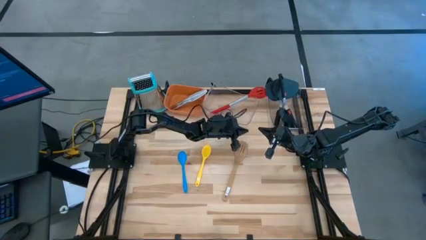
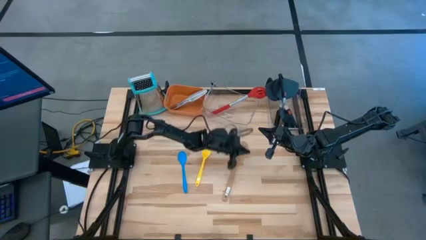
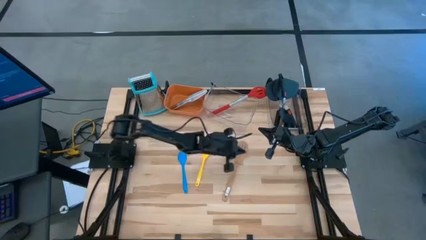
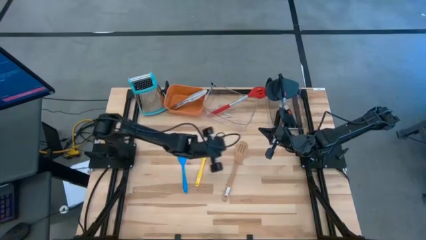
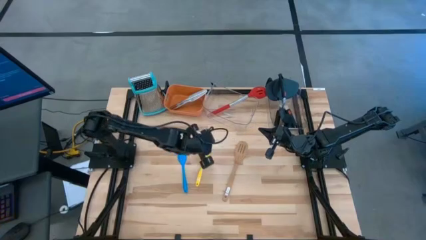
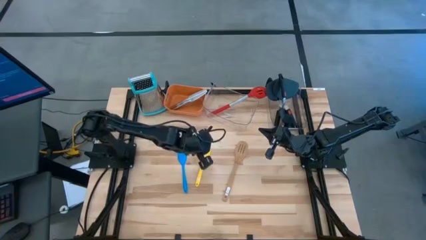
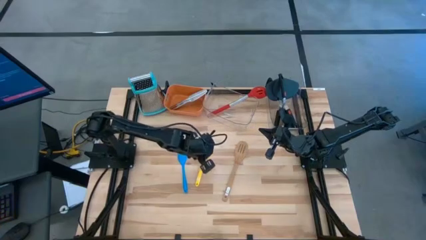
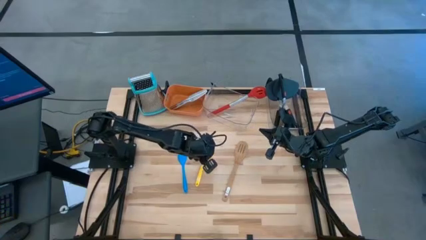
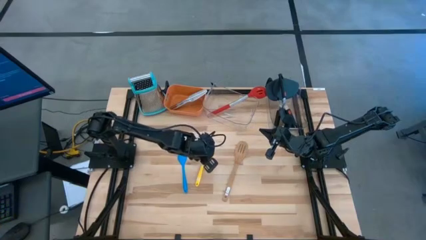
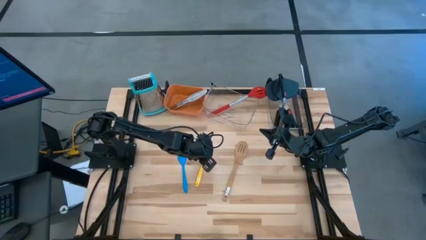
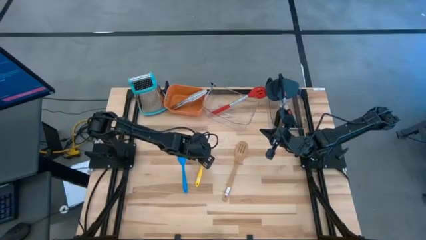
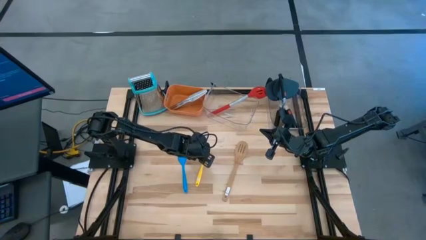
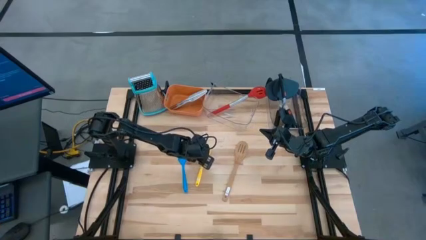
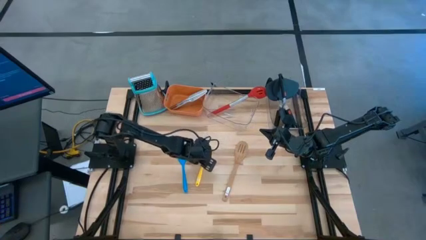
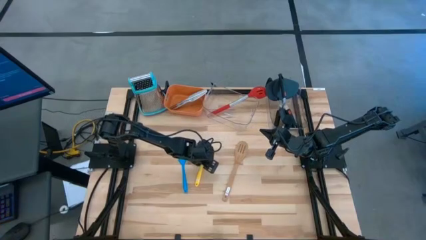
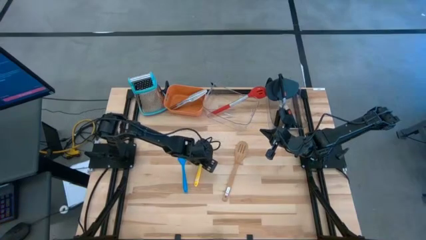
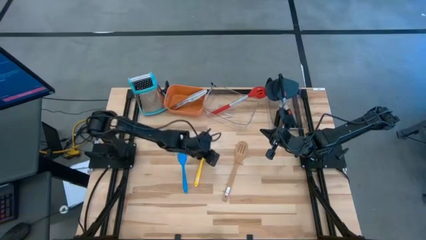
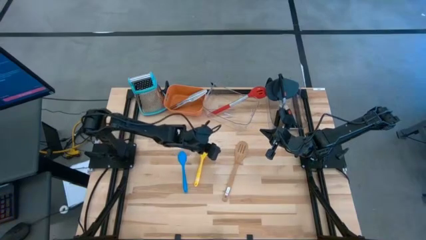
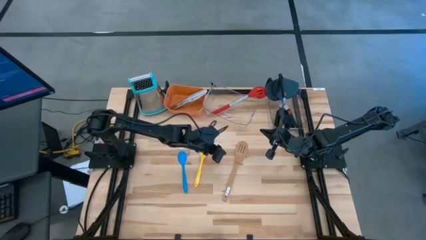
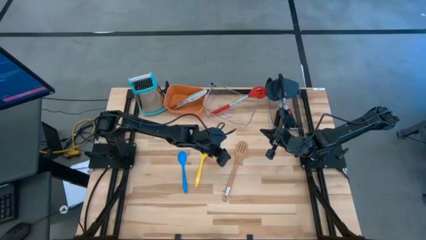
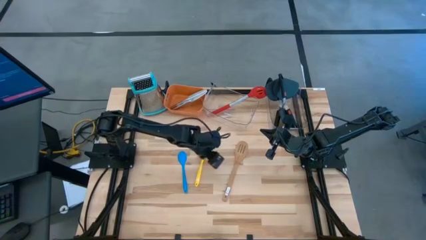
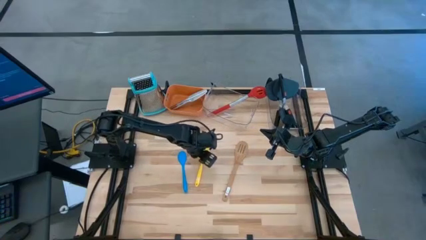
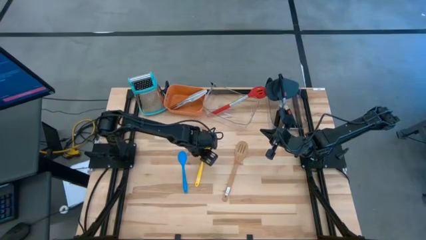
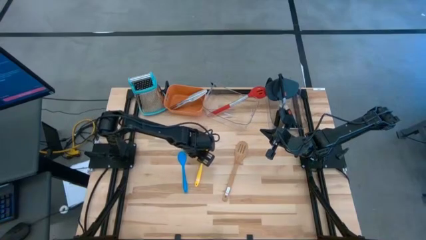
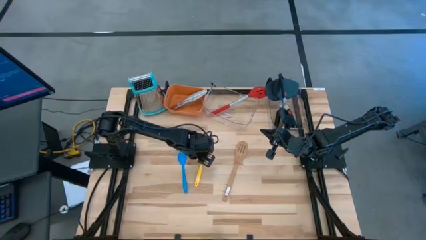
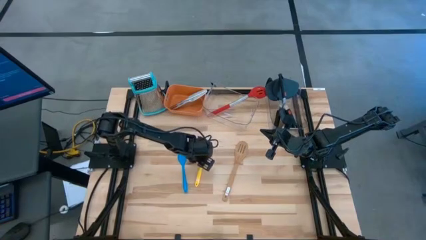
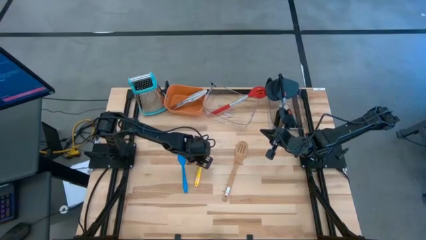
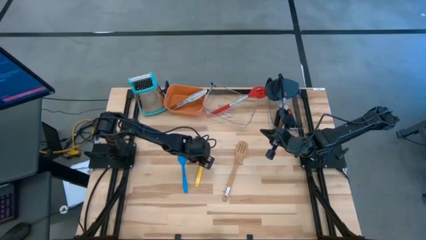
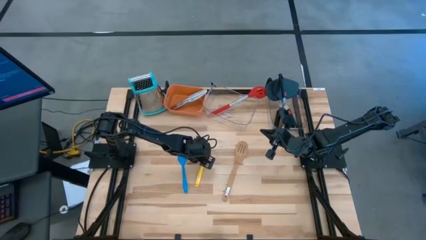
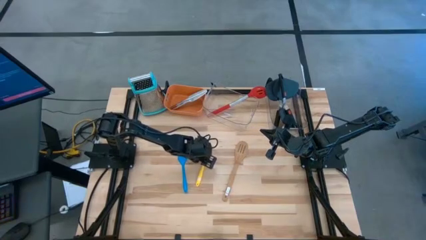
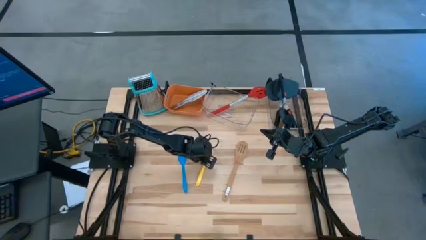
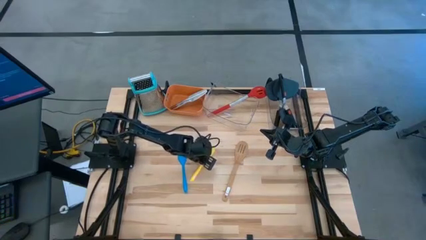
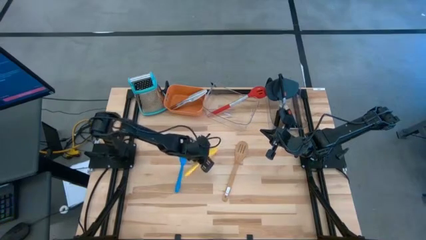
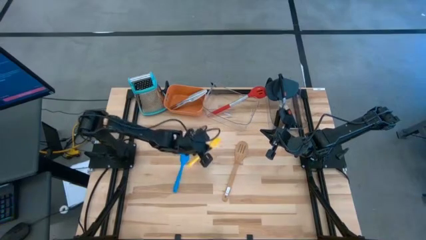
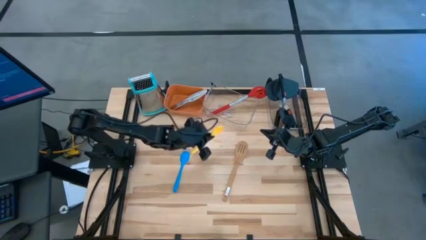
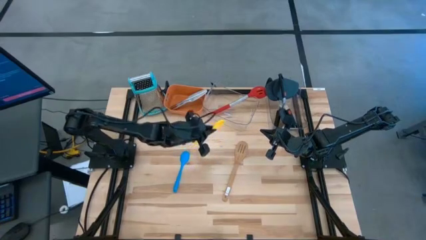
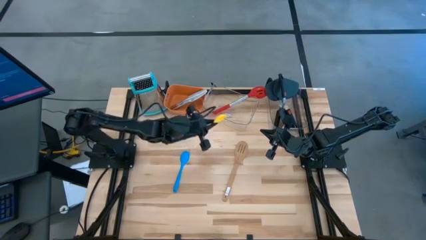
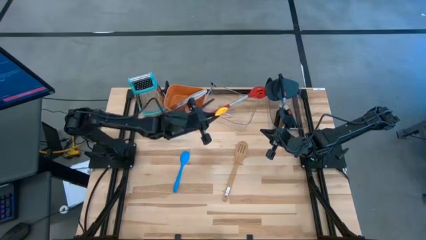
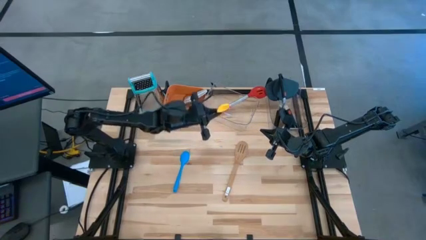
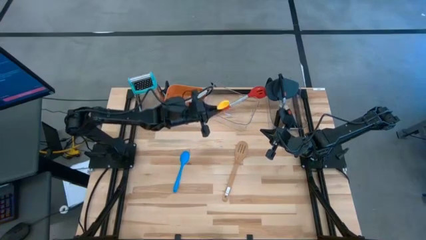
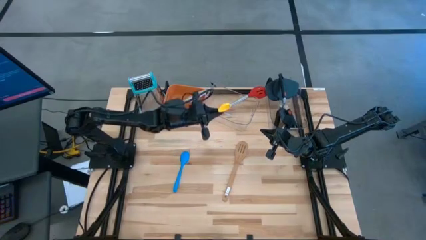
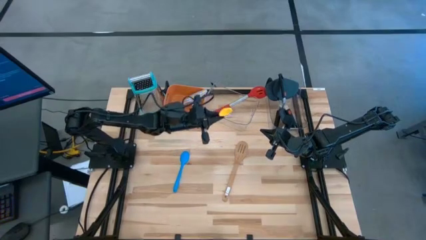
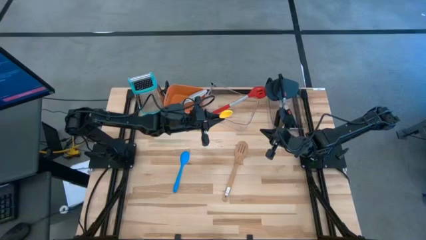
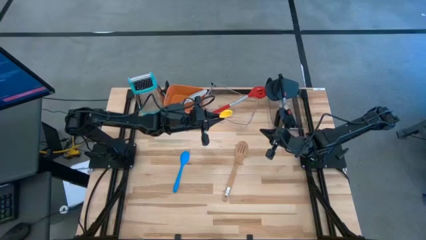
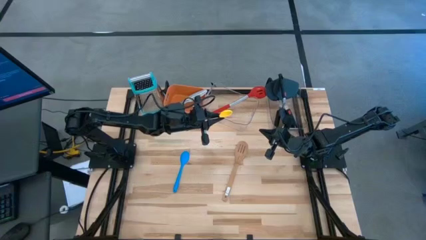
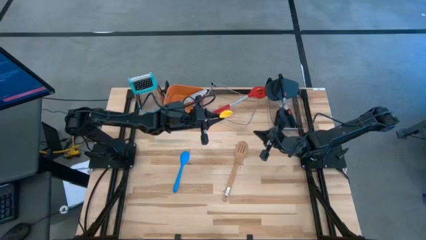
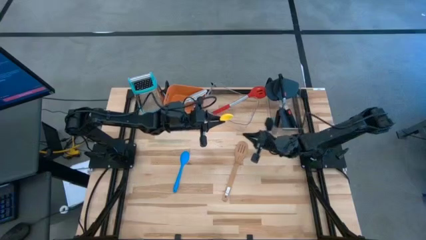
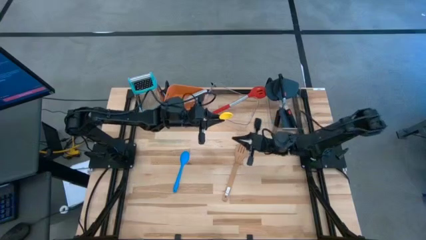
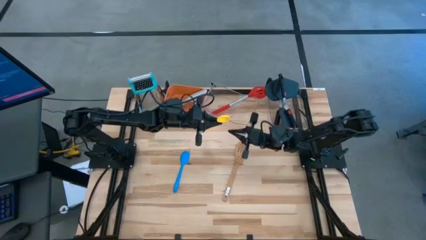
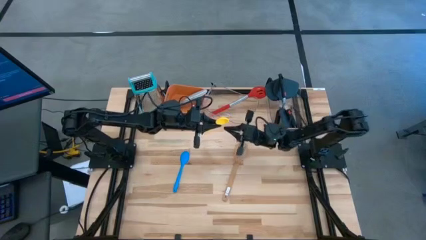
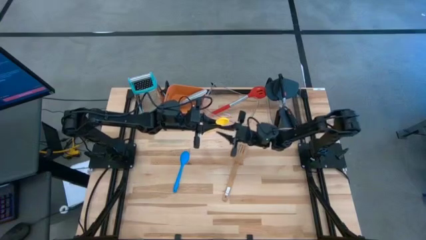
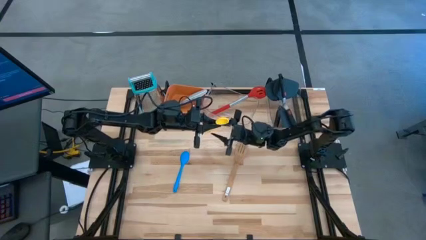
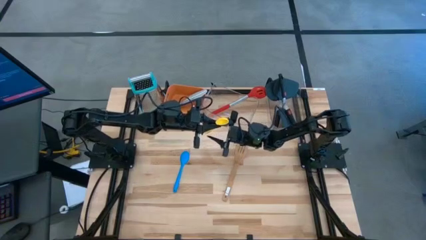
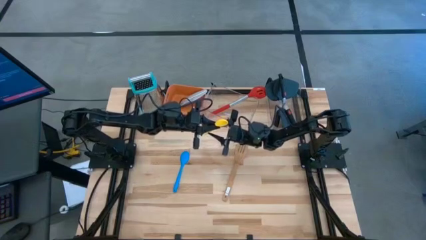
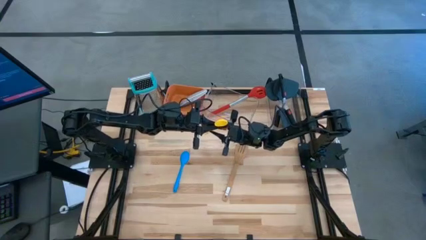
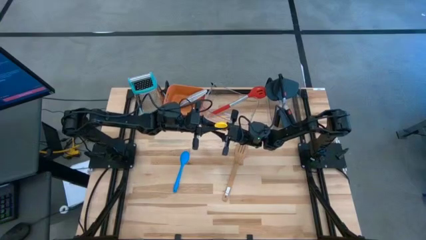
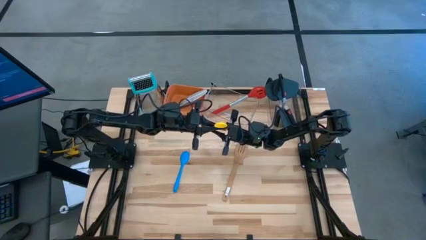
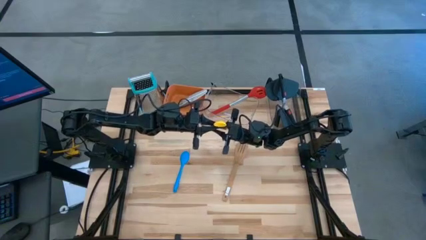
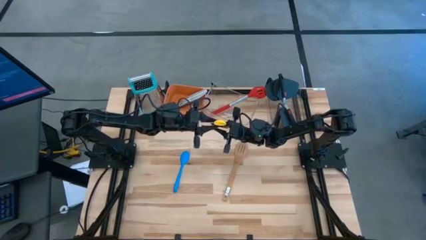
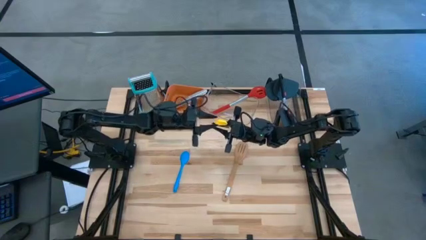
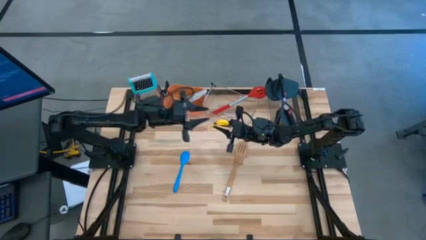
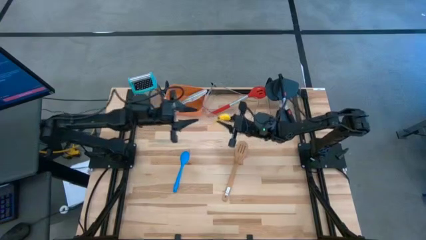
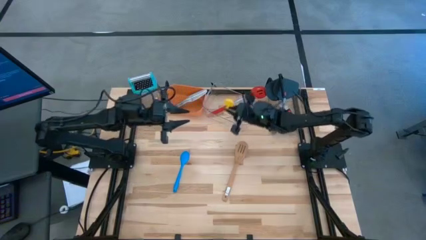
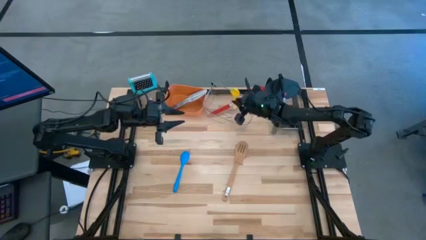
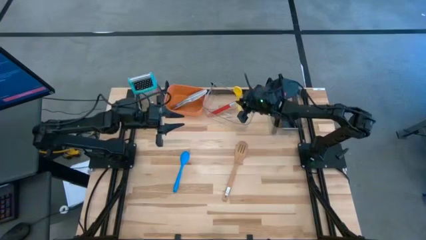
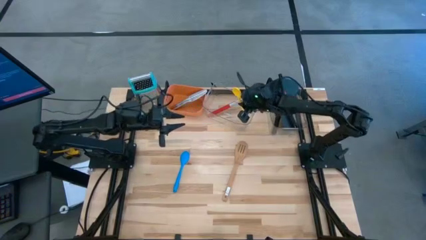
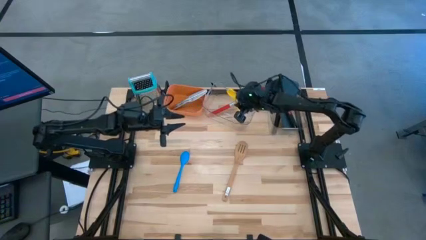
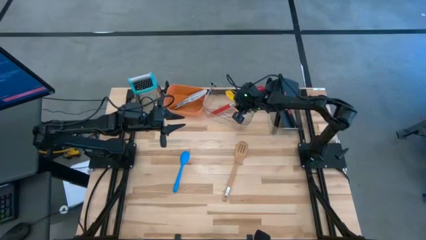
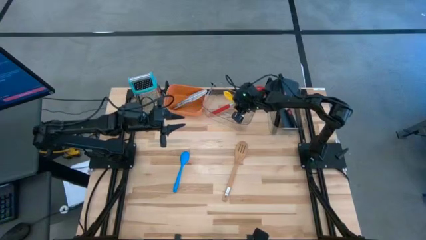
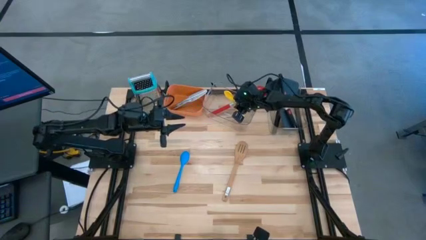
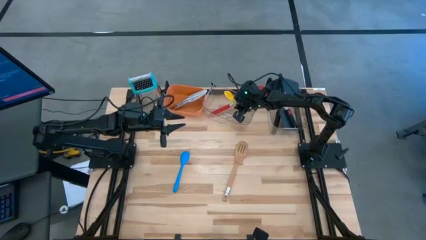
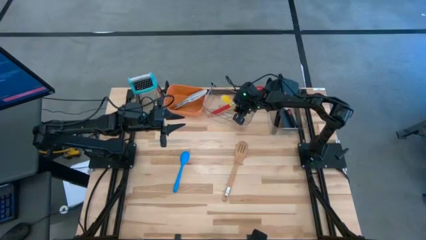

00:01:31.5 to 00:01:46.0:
Task: Pick & Place Kitchen Items
Put the yellow serving spoon into the left transparent bin

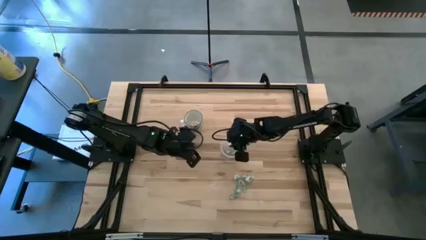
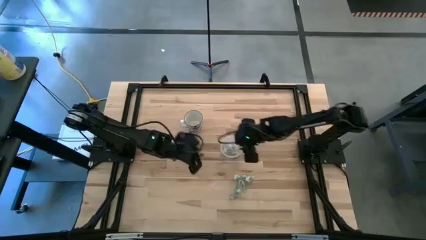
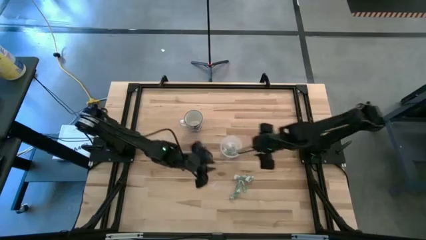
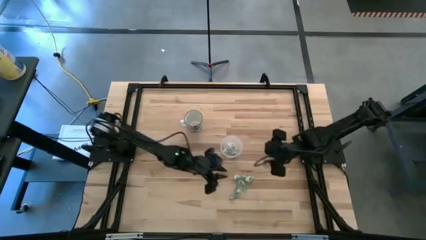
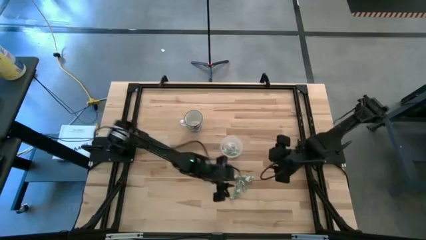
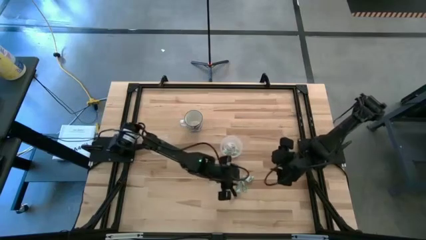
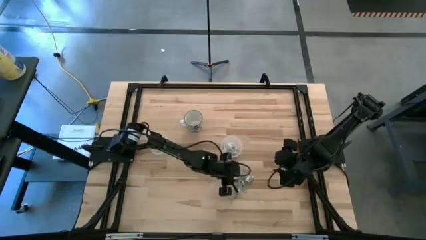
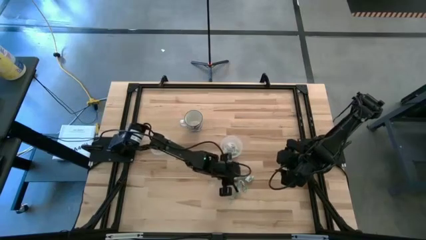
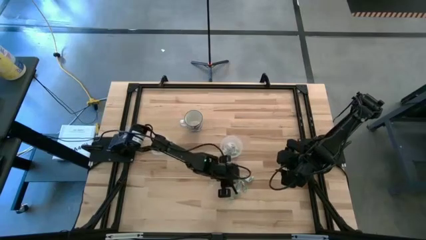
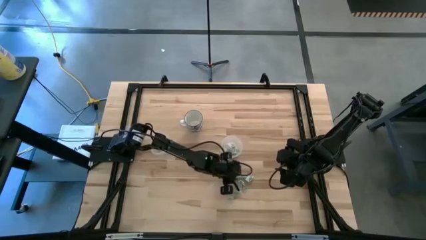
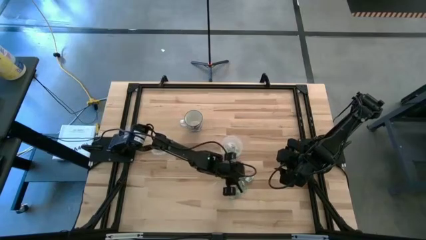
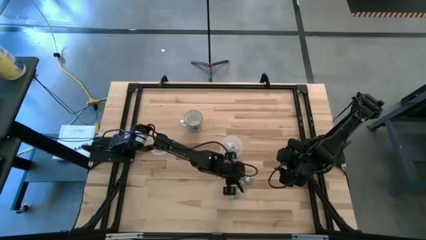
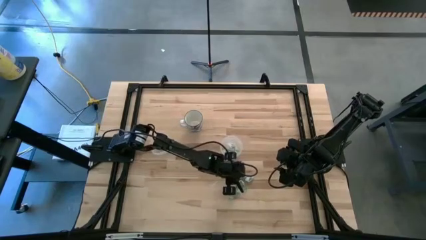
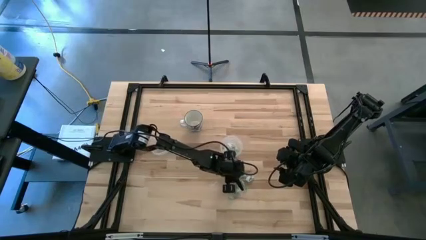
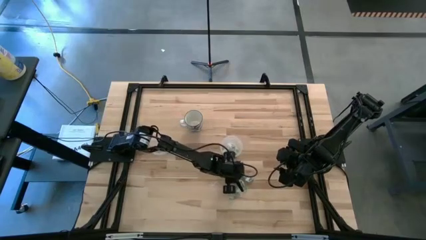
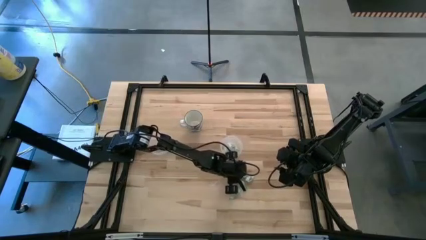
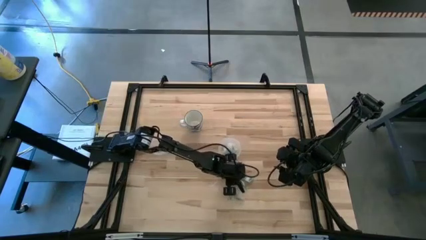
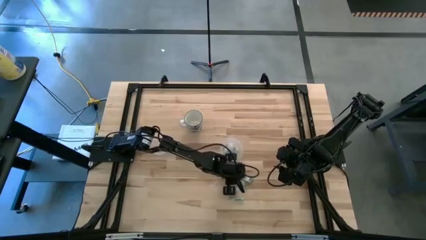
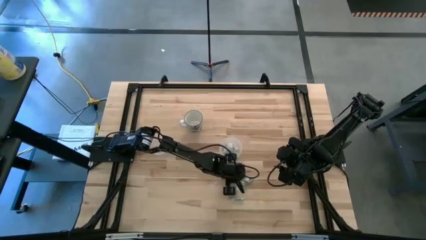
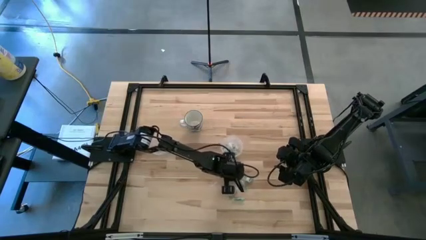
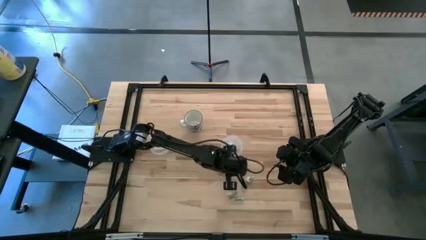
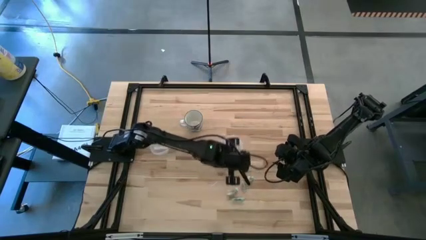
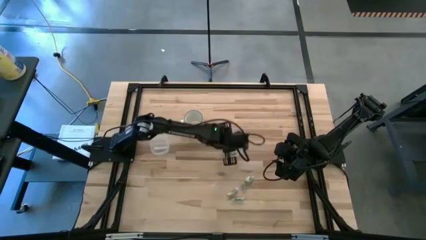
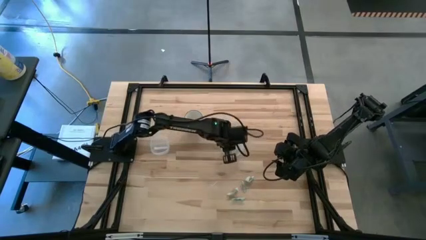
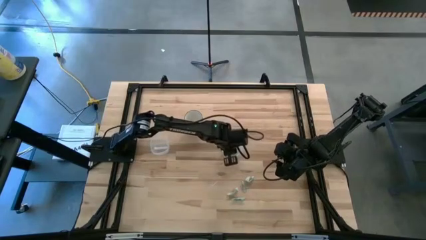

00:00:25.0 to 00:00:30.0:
Task: Pick and place Stevia / Truvia into bins
Put the green stevia packet into the right transparent container
